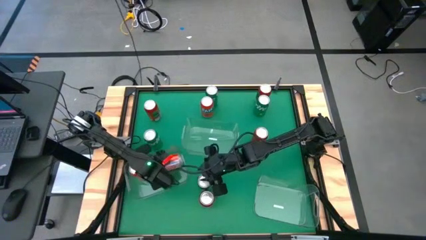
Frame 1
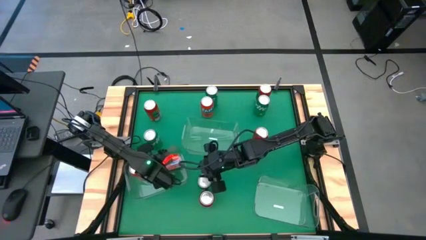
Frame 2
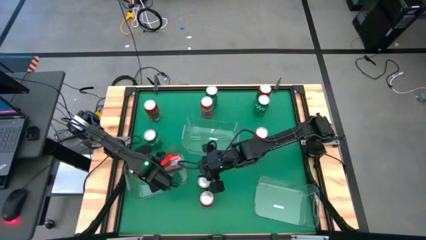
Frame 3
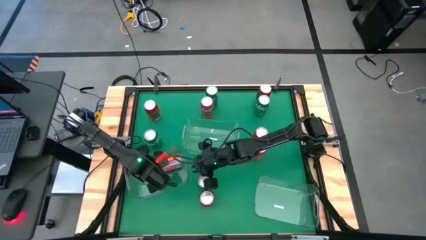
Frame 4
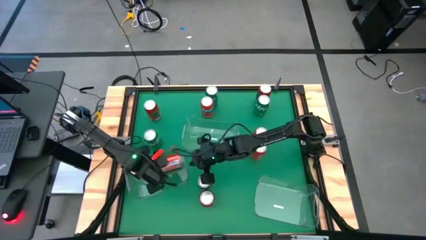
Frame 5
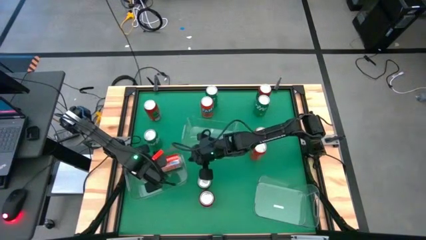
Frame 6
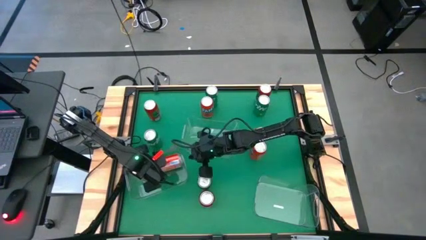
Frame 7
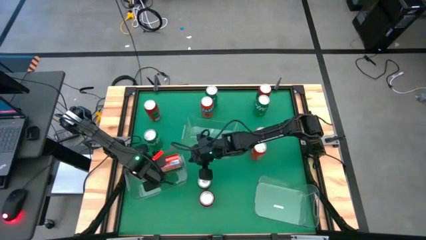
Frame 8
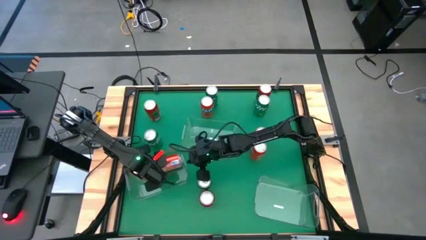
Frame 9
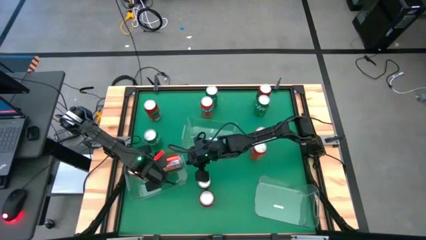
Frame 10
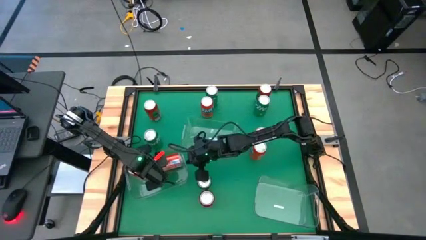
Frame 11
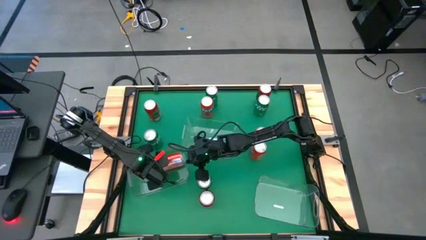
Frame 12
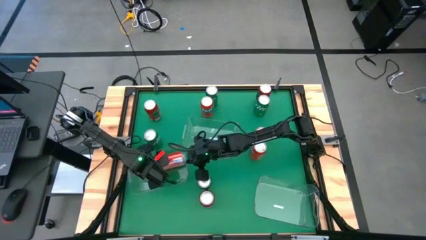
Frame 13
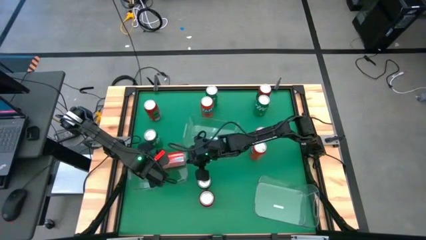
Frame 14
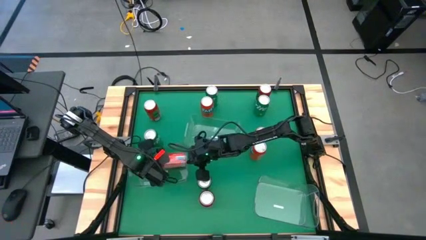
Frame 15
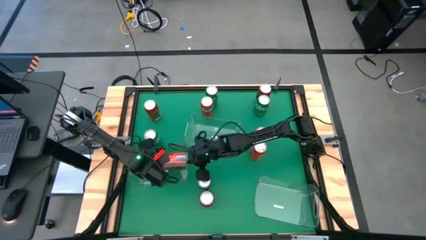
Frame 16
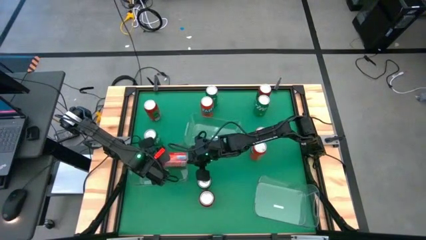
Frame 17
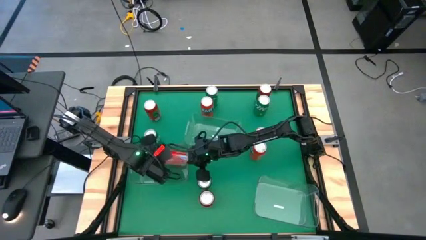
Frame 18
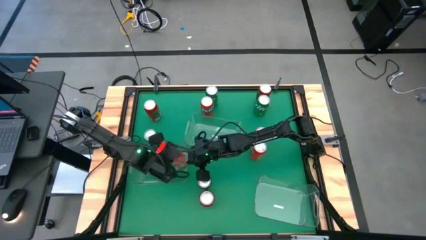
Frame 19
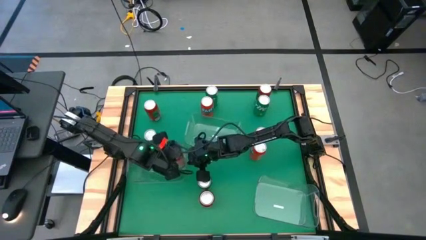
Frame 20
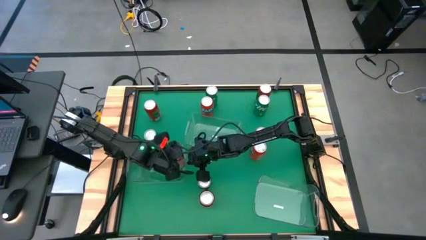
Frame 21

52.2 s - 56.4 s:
Task: Sort soda cans
Put the bottom left red soda can into the bottom left transparent bin

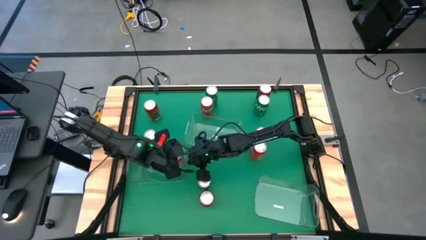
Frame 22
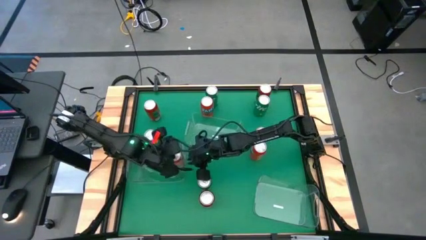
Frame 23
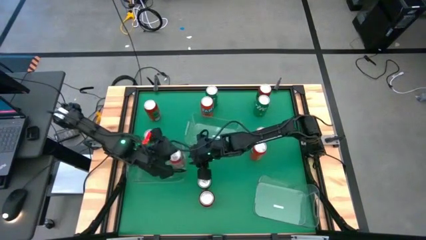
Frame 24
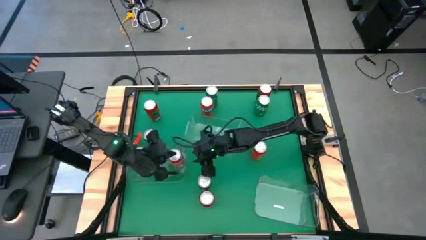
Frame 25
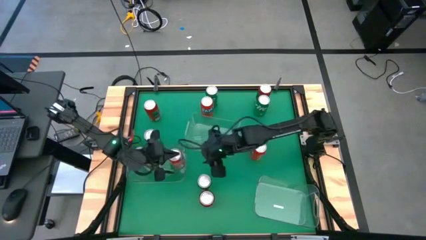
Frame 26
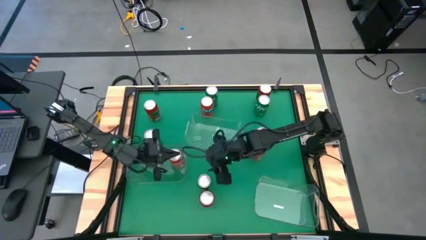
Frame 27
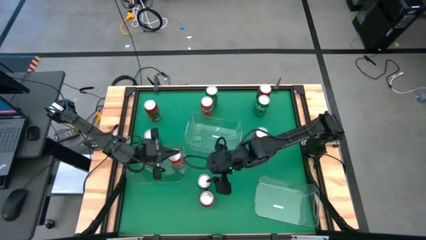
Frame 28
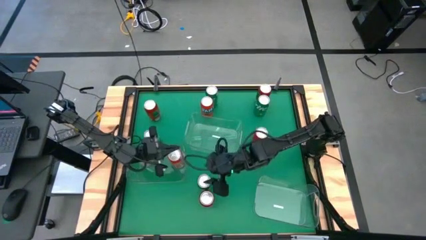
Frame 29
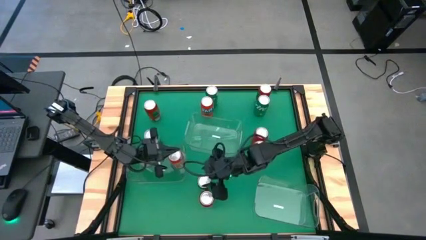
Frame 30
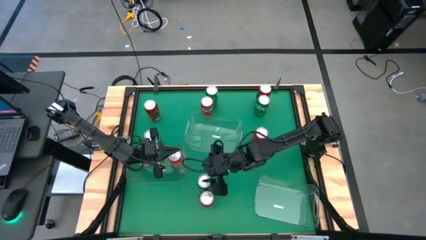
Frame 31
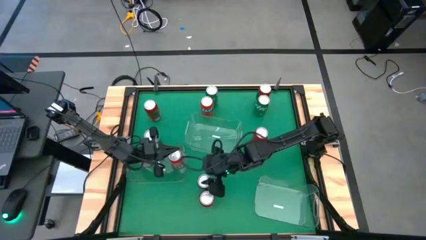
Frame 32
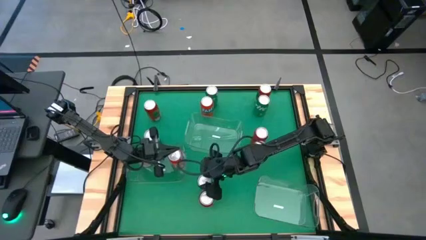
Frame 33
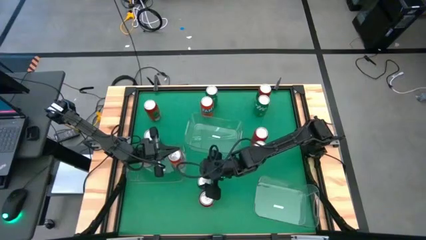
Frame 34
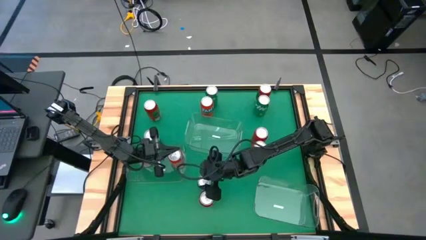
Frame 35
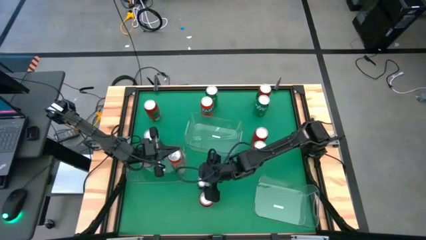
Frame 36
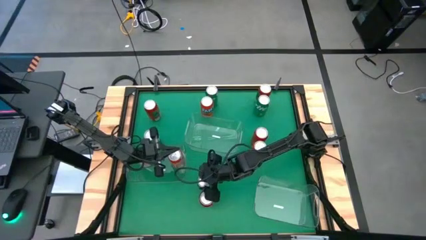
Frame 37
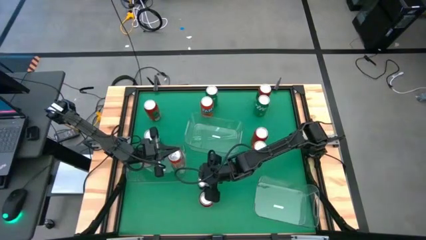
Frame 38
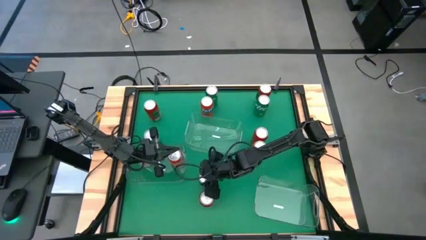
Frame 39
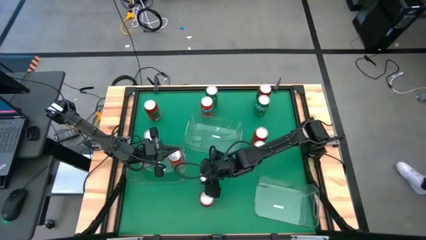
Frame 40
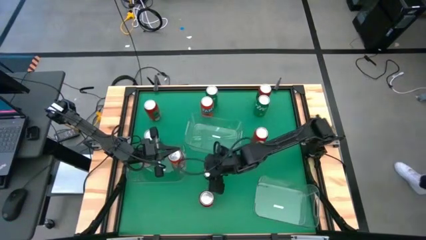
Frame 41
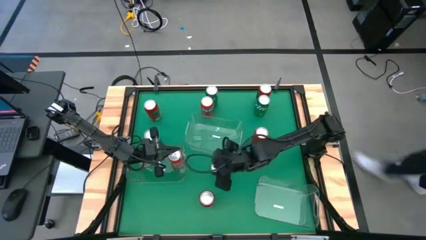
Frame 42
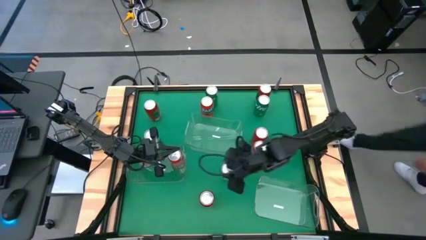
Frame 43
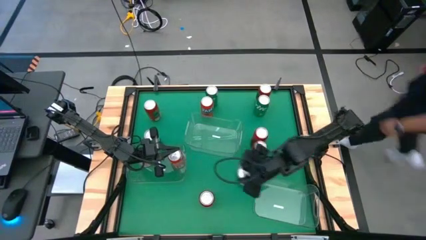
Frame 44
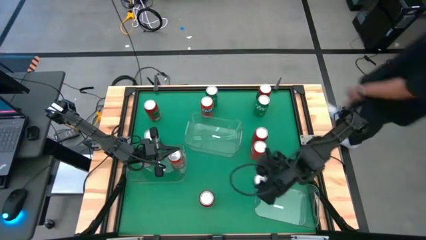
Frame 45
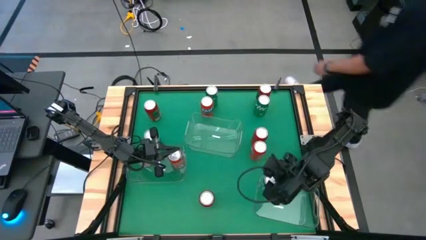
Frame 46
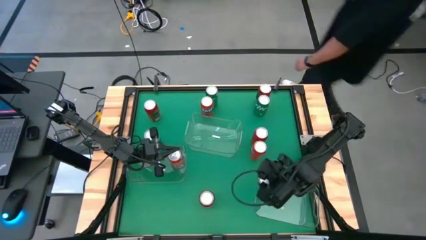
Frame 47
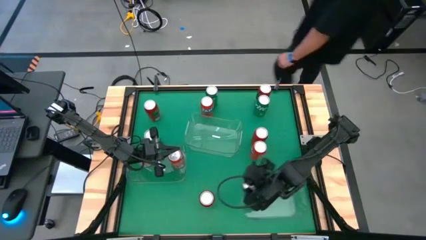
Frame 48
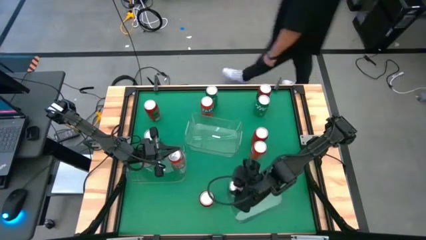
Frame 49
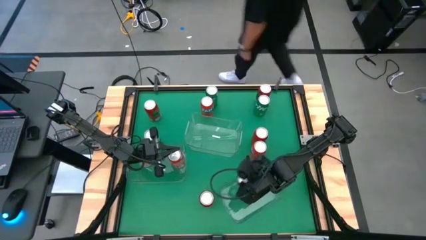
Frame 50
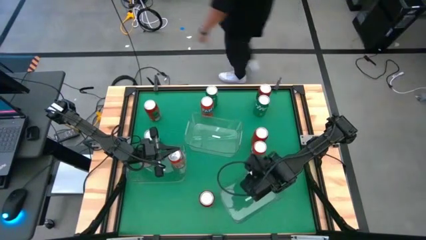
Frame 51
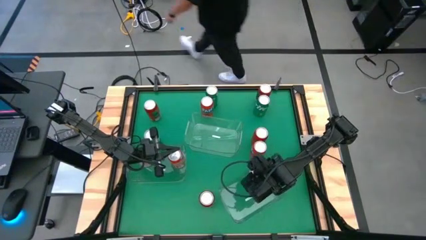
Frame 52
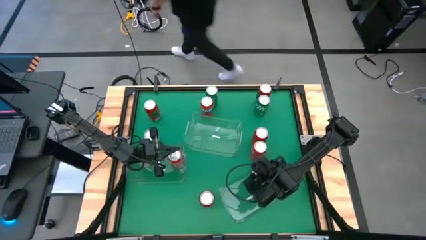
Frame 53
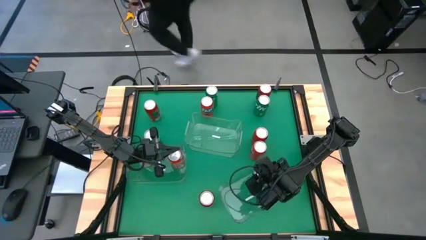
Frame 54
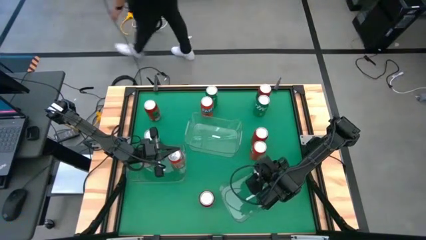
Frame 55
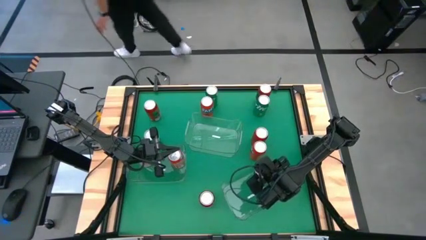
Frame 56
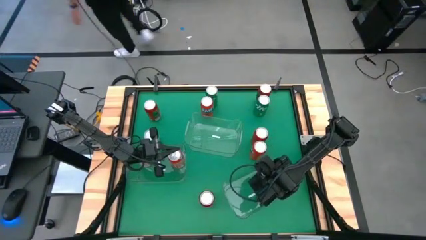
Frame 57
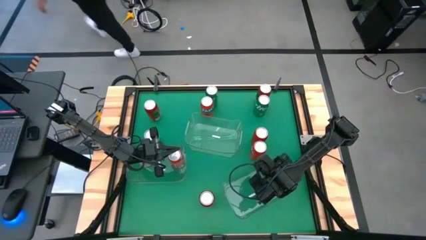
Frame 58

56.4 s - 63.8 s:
Put the green soda can into the bottom right transparent bin

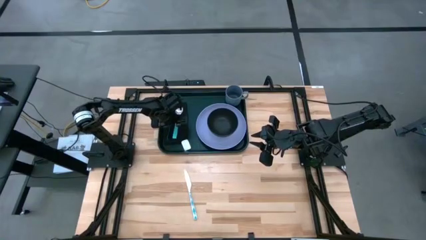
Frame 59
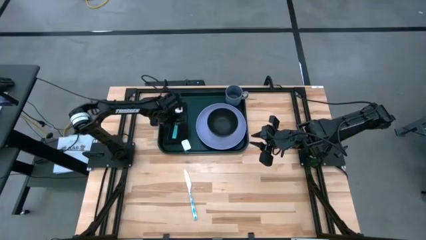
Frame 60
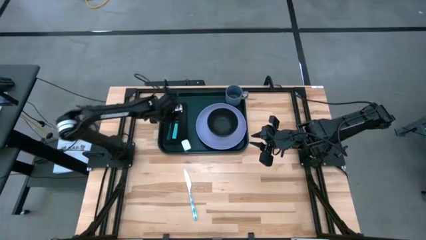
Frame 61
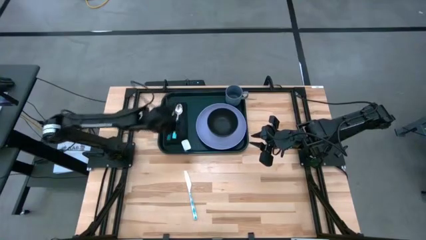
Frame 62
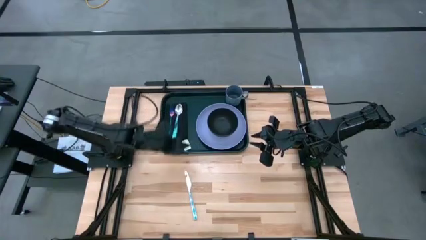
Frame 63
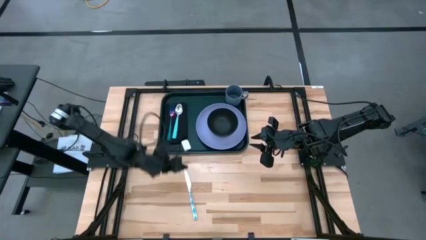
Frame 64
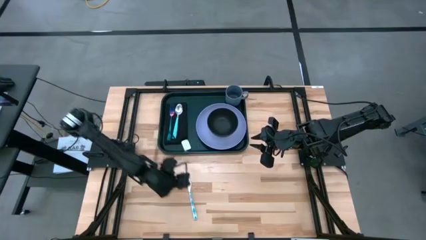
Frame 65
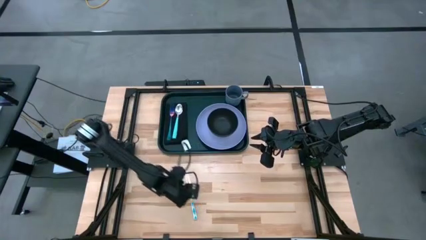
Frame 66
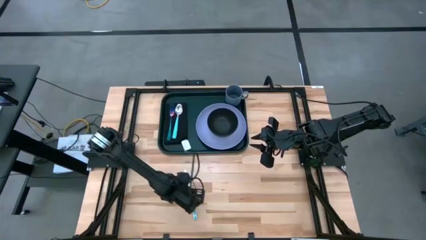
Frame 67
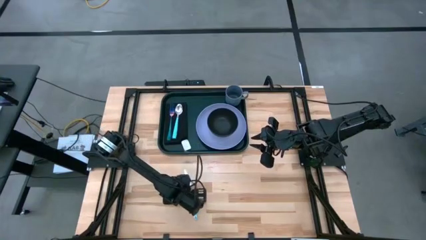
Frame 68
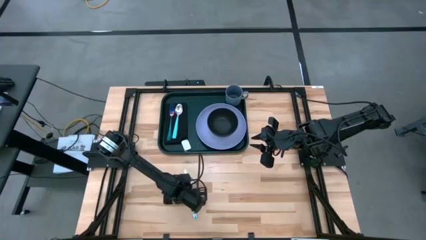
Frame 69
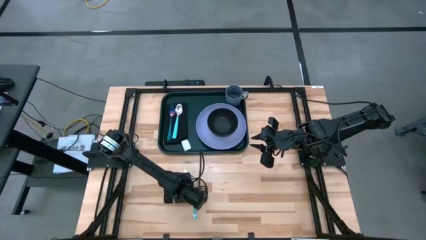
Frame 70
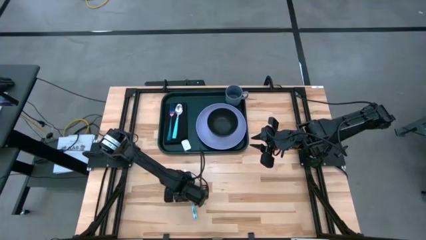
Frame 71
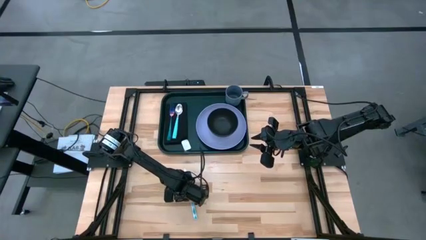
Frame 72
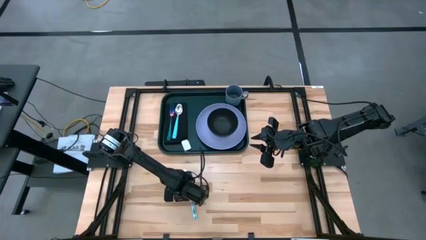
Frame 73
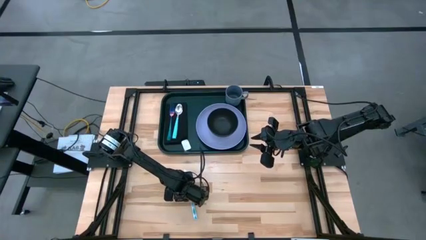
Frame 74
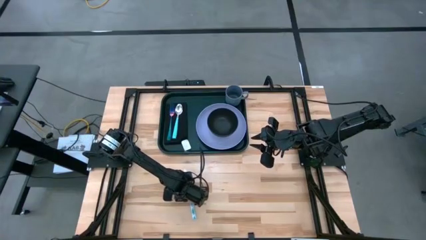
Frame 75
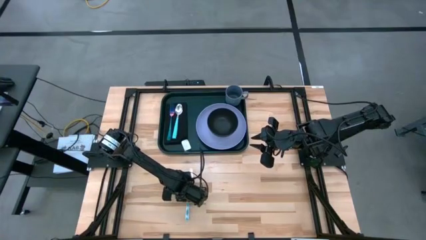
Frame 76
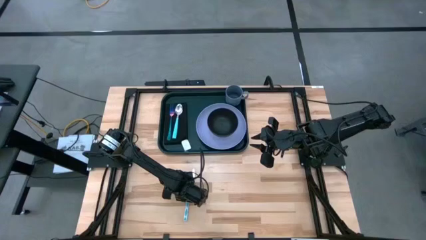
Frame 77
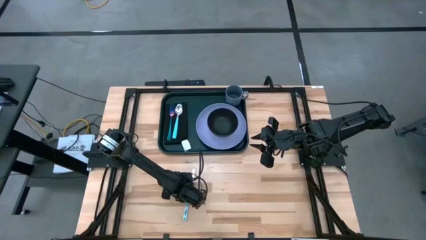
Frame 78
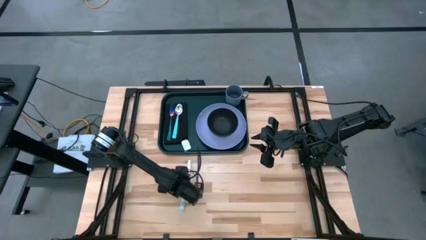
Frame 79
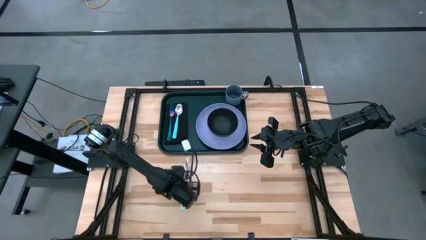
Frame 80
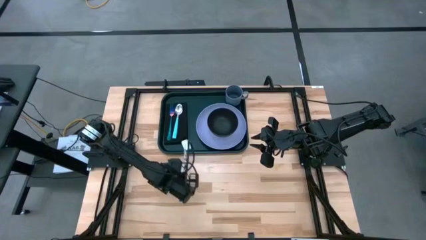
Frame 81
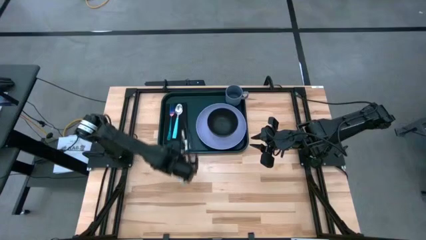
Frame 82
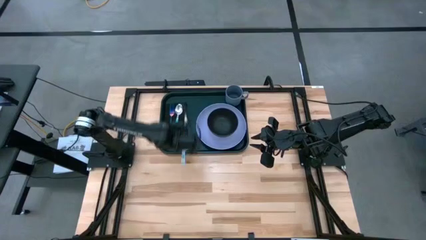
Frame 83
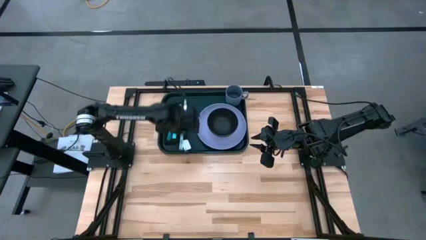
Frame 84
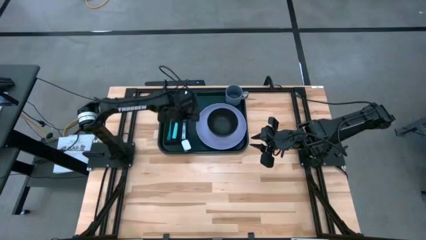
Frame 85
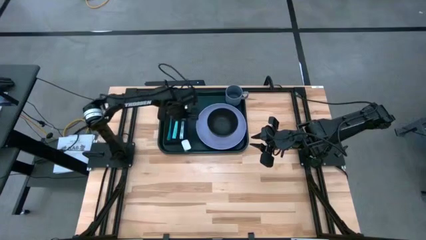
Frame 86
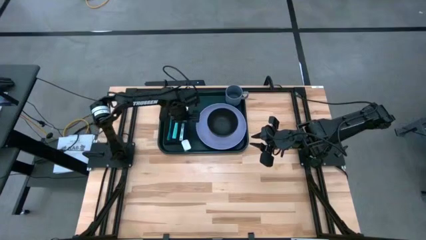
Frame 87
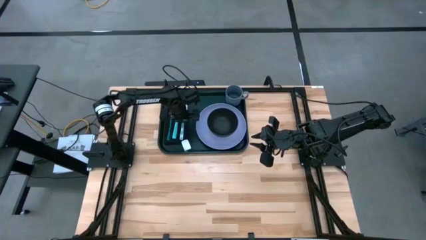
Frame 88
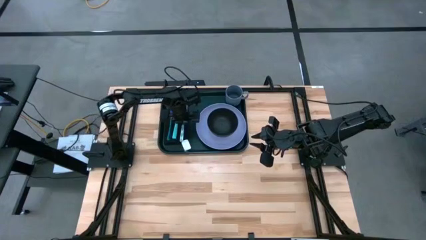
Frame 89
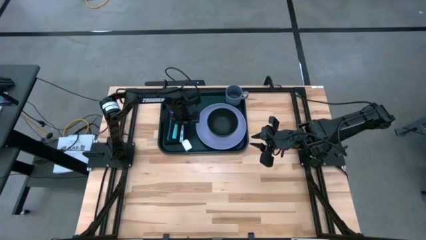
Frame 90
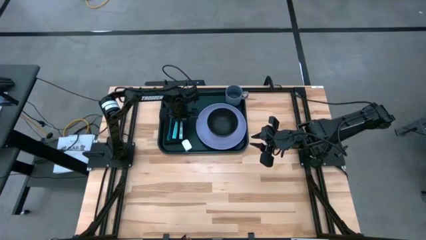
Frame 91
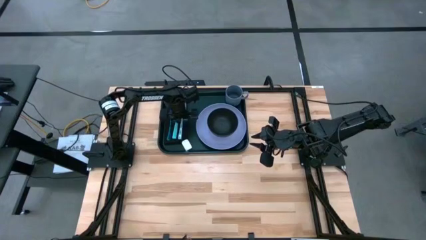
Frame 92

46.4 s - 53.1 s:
Task: Set up tray
Put the blue knife to the right of the blue spoon on the black napkin
